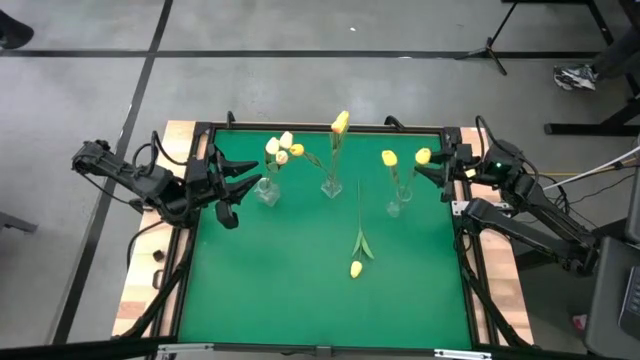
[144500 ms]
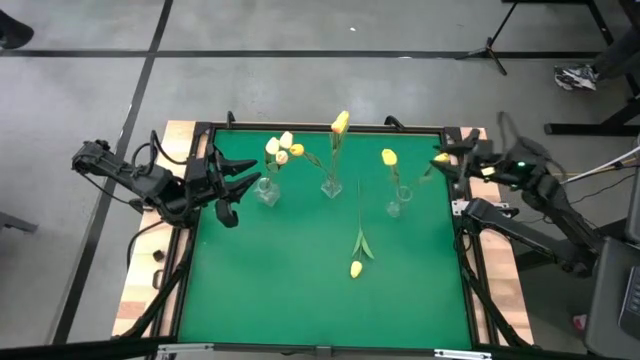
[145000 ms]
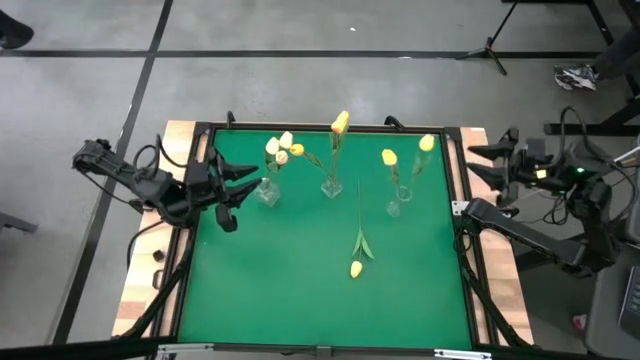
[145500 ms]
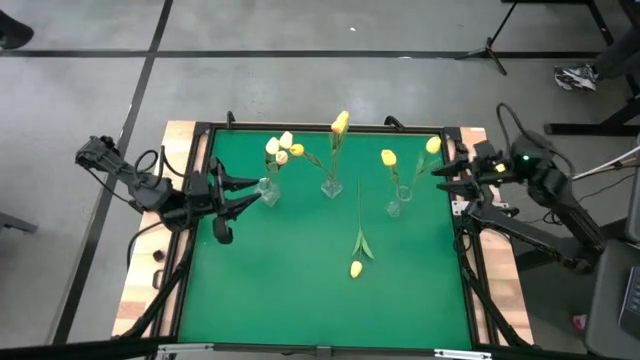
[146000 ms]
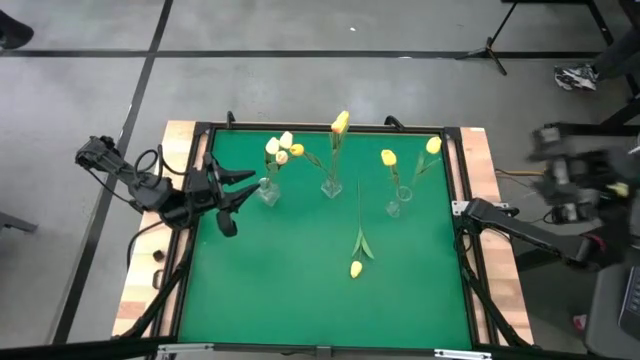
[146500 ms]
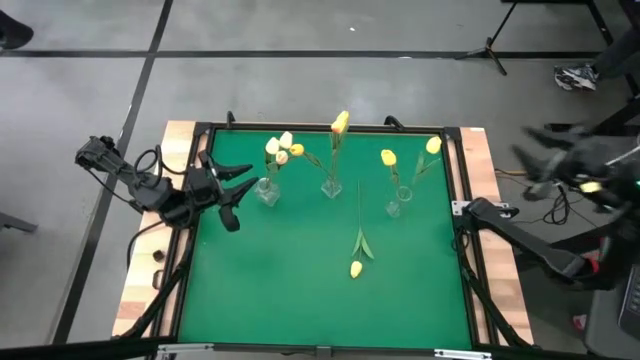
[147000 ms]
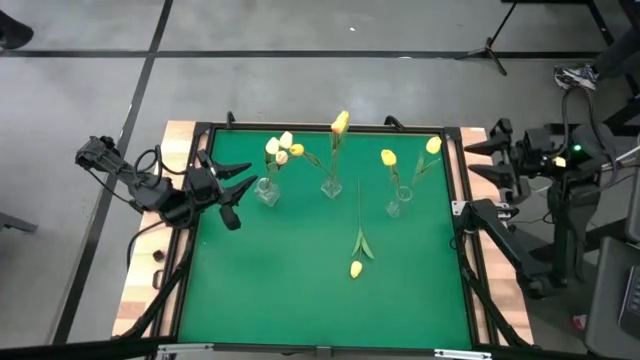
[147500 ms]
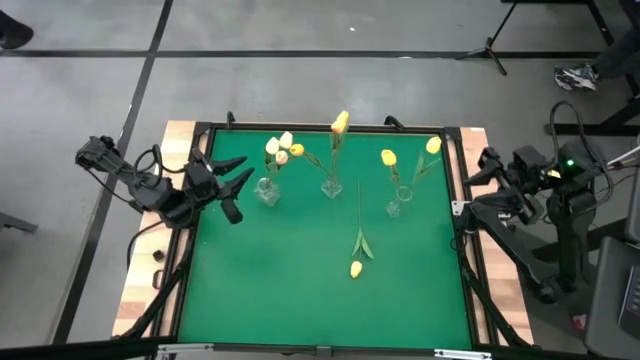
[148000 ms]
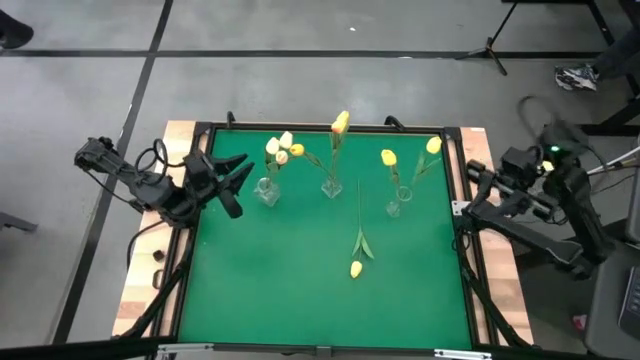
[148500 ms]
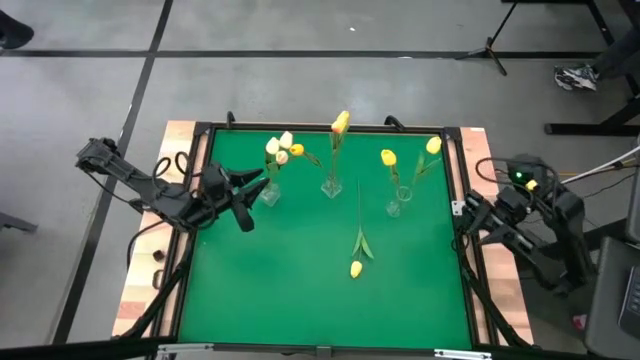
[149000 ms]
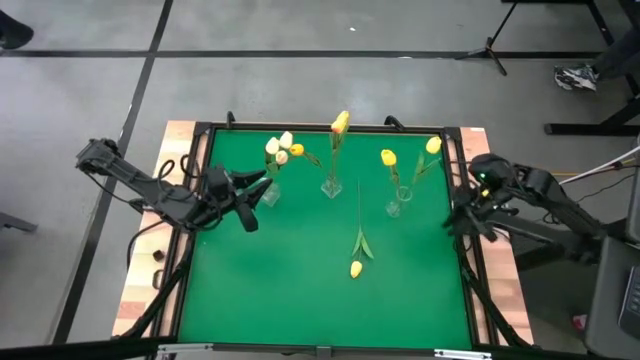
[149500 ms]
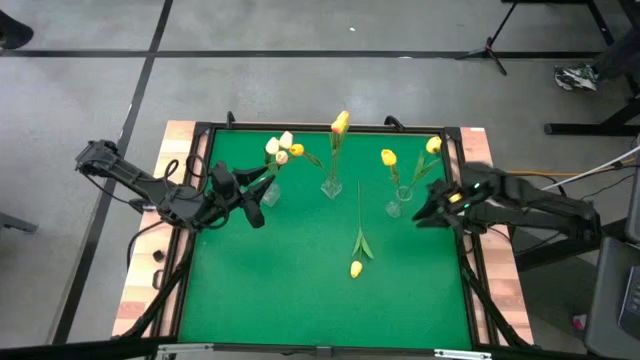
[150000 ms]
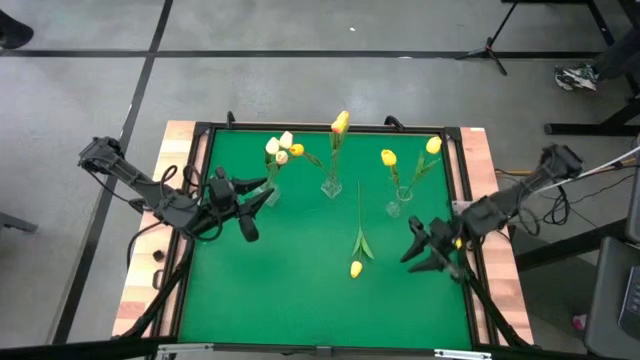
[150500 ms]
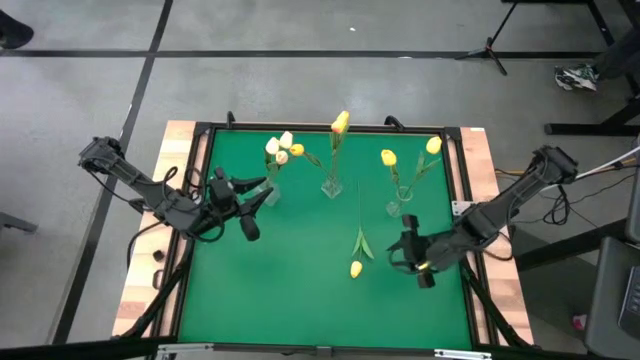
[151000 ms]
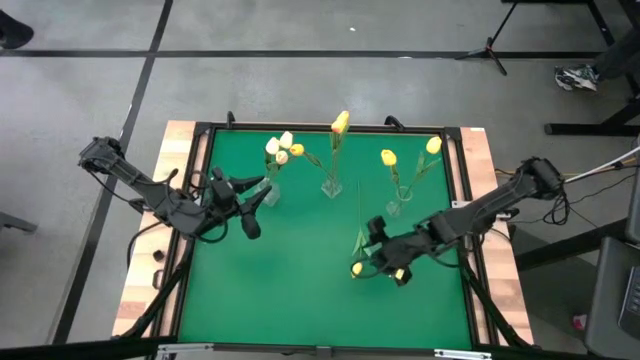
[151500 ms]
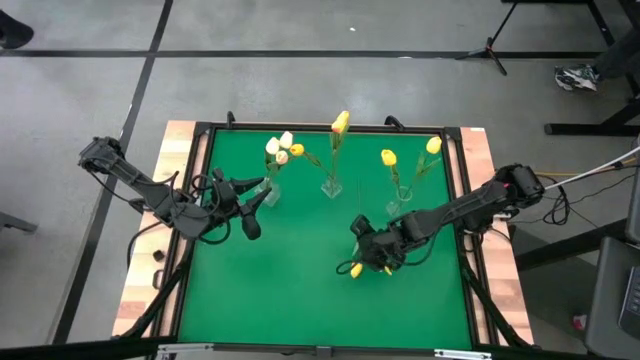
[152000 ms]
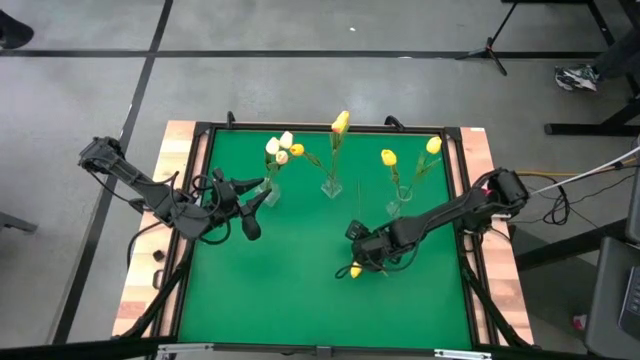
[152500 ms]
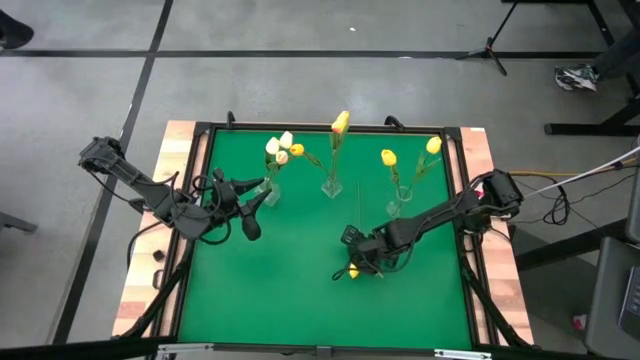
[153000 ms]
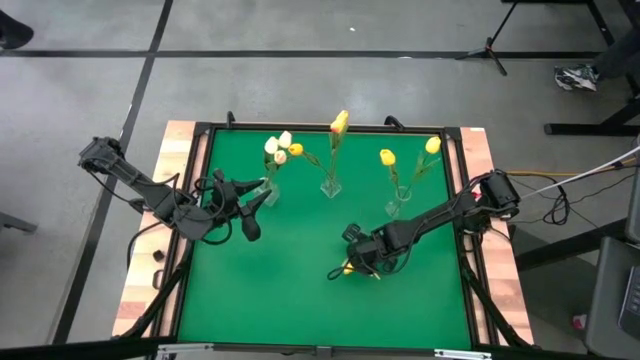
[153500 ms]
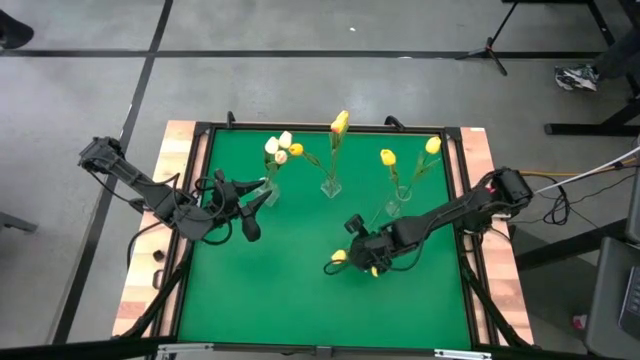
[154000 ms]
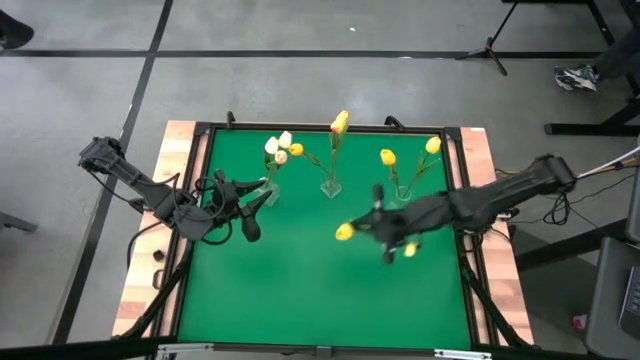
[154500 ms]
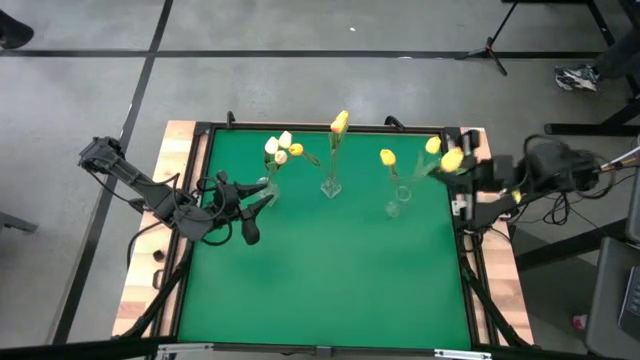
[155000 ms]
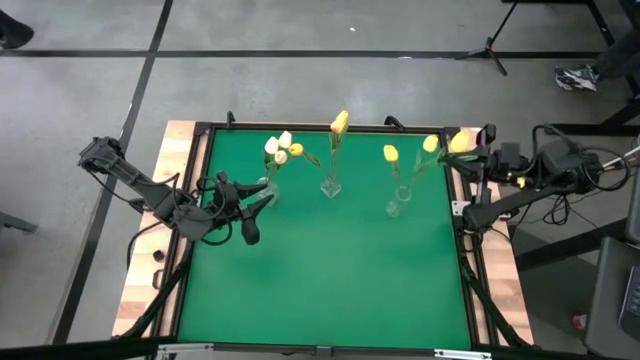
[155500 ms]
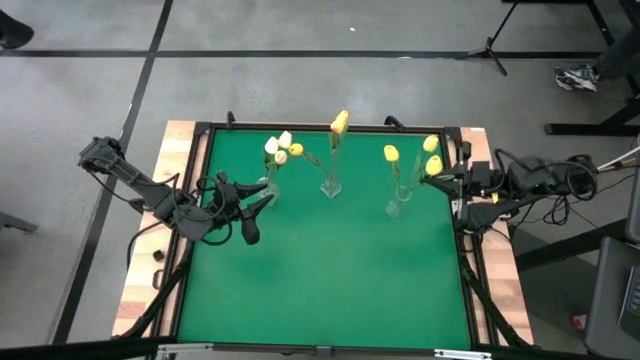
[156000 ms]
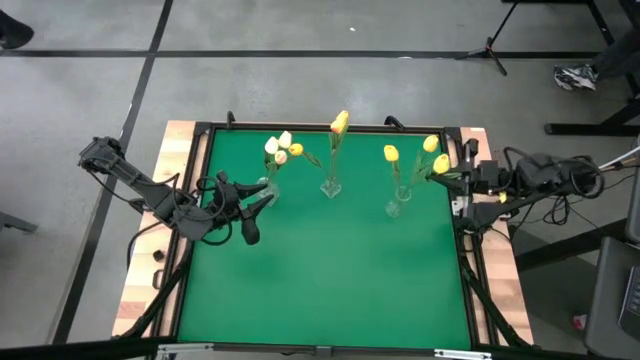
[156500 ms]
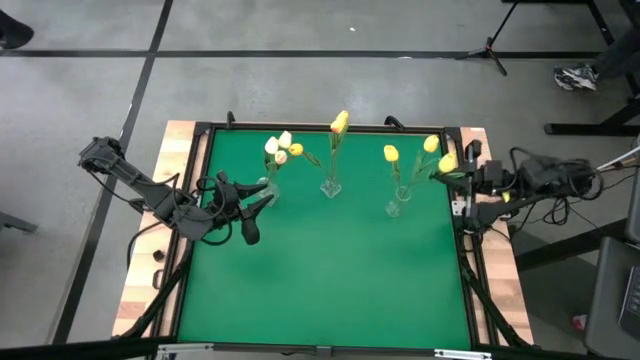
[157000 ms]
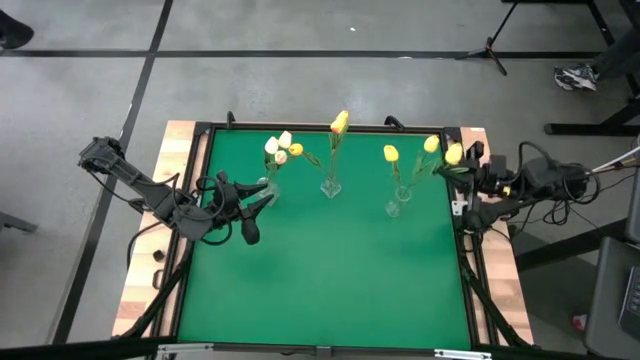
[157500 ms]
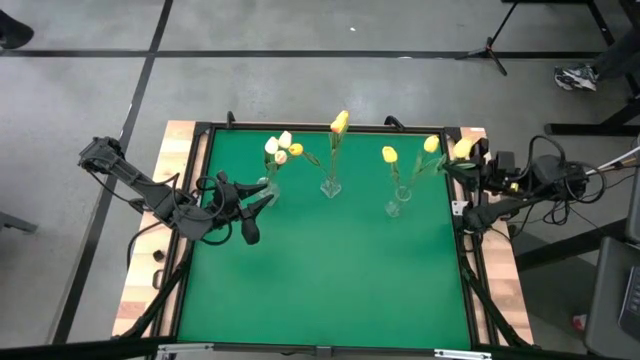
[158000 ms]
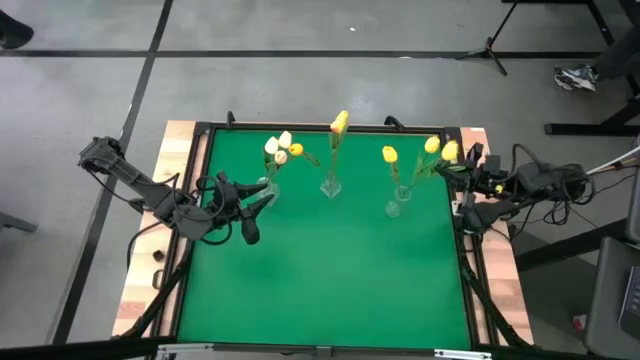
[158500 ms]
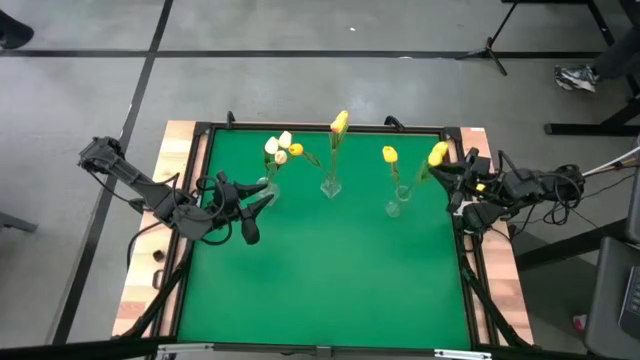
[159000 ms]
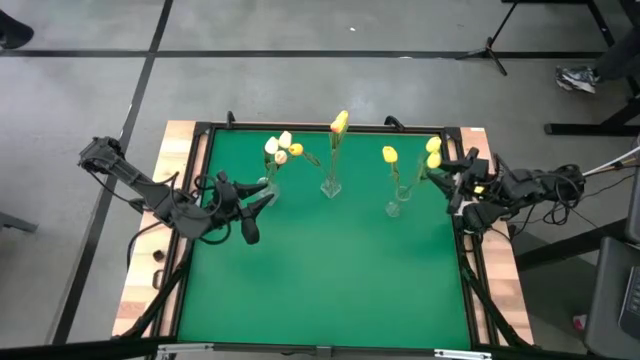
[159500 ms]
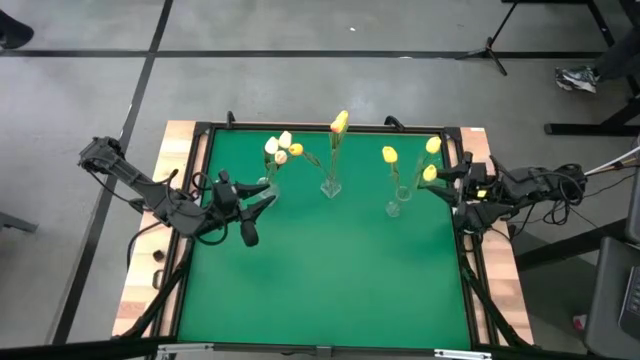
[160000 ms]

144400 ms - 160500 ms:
Task: Sort flowers into vase by color
Put the yellow flower into the right transparent vase

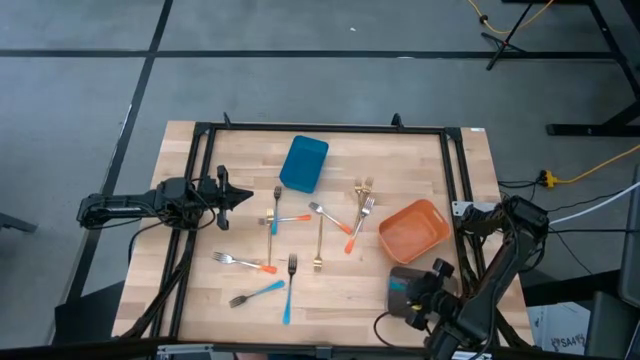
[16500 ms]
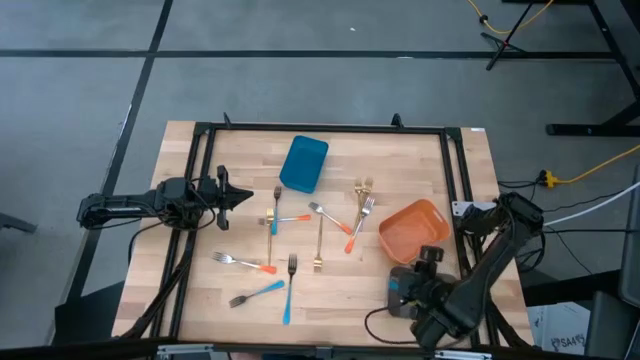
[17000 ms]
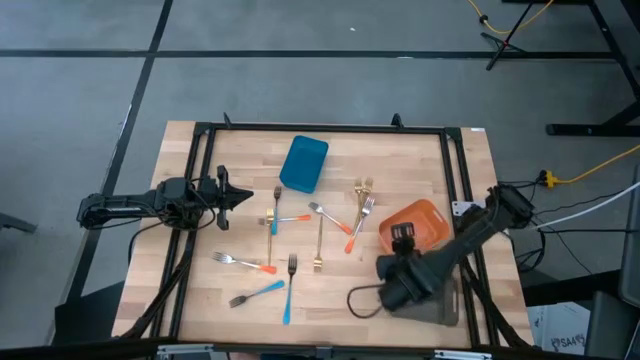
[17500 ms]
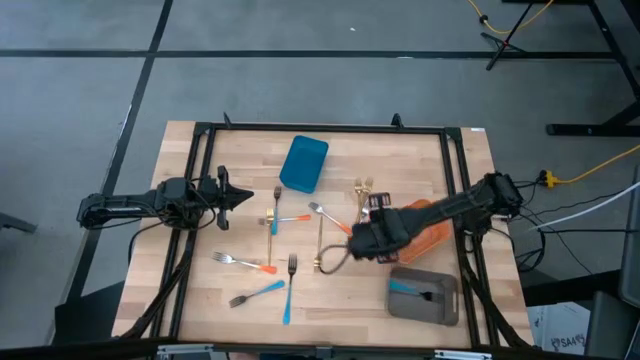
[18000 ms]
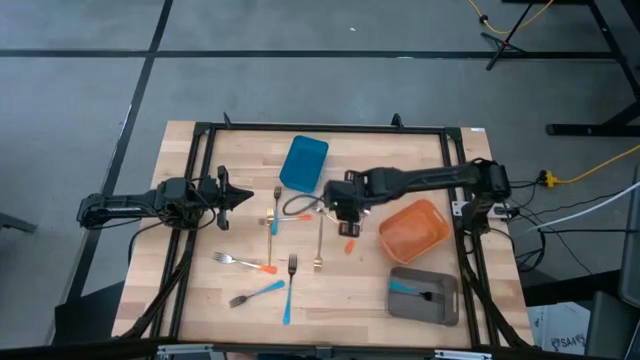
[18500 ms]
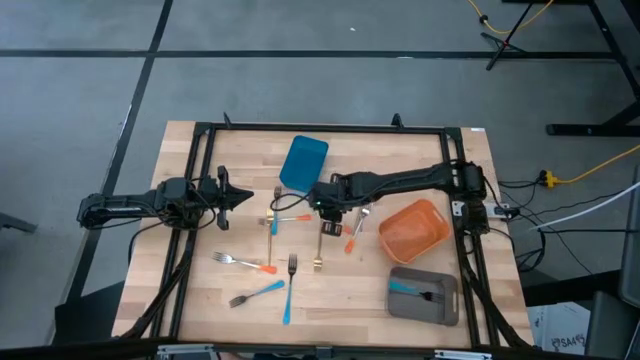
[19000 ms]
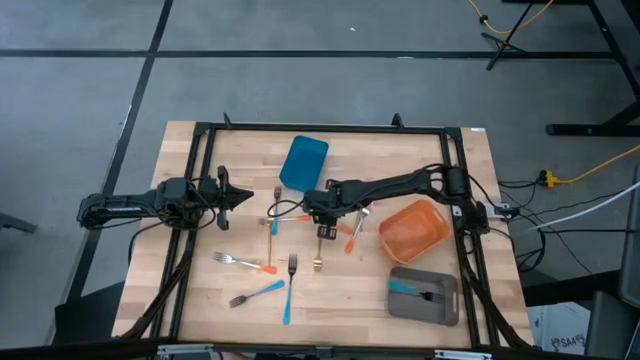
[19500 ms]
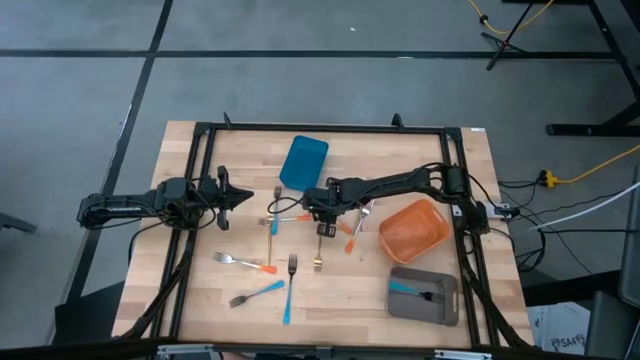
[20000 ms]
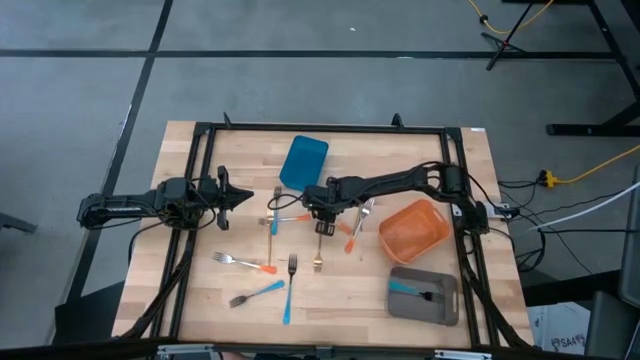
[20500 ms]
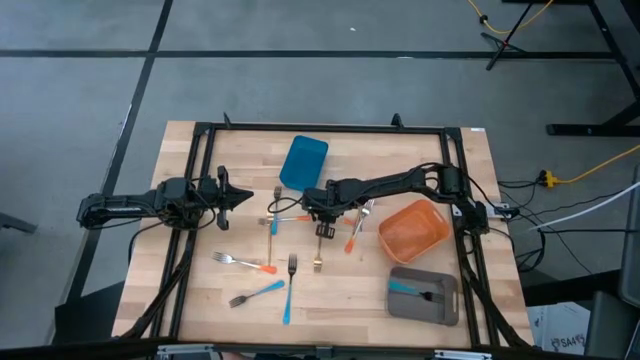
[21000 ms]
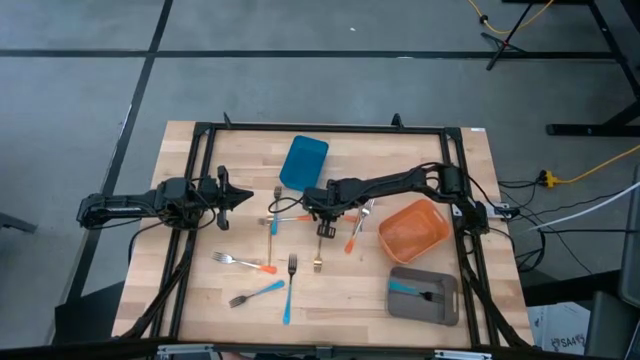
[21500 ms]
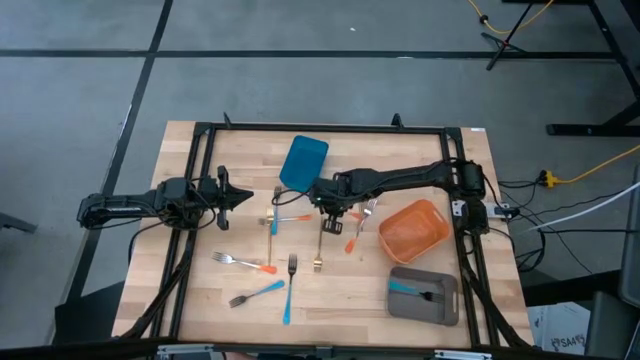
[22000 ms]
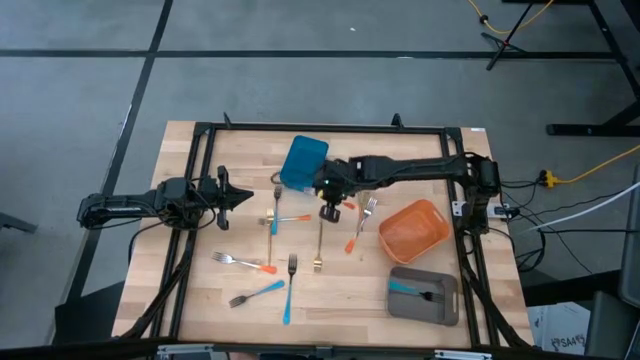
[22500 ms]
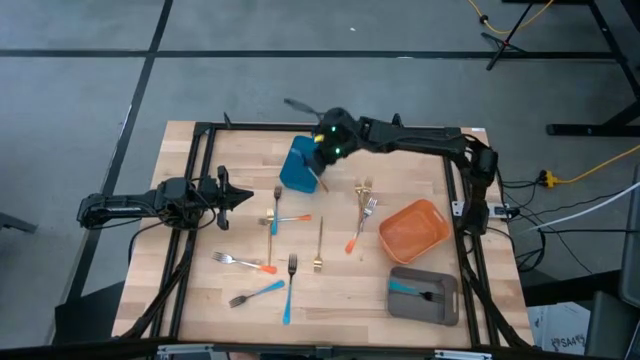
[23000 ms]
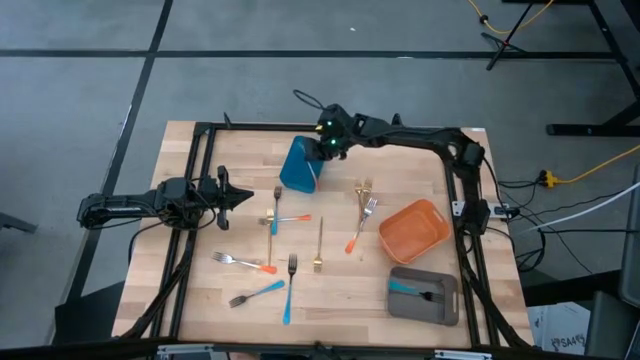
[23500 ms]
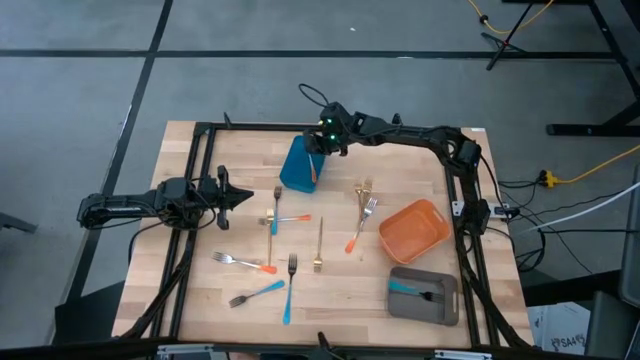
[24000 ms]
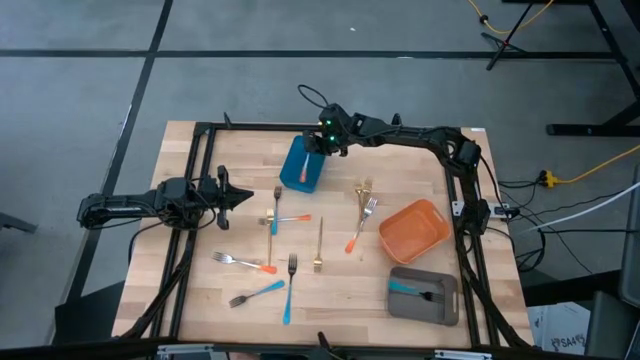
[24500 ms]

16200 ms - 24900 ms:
Task: Sort silverware by color (type)
Put the middle right orange fork into the blue bin
